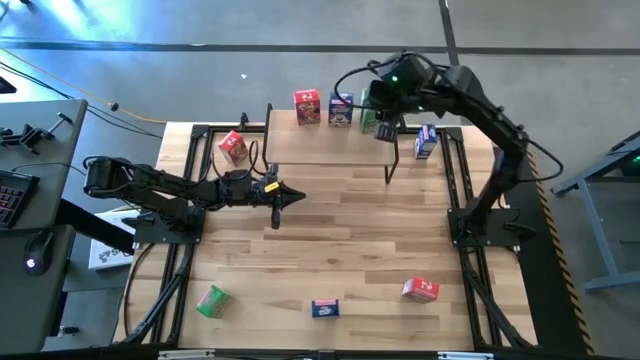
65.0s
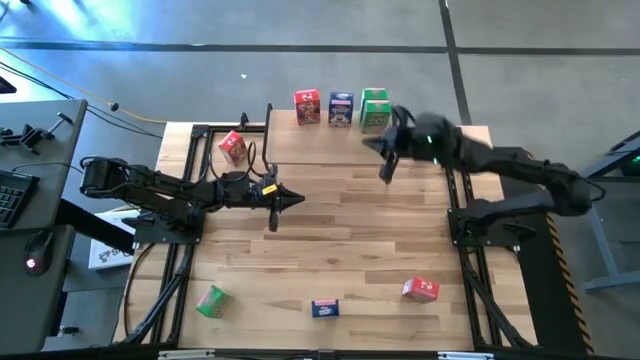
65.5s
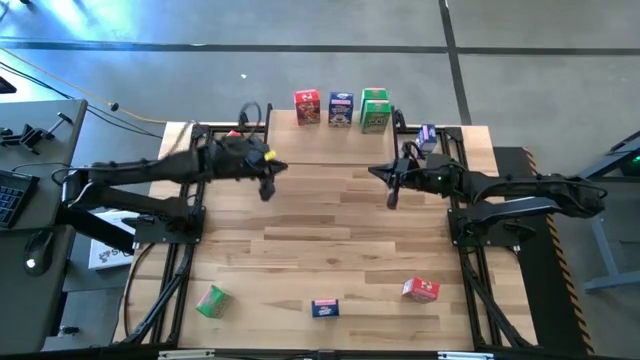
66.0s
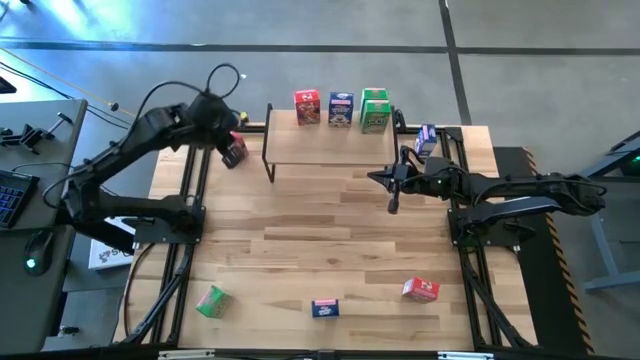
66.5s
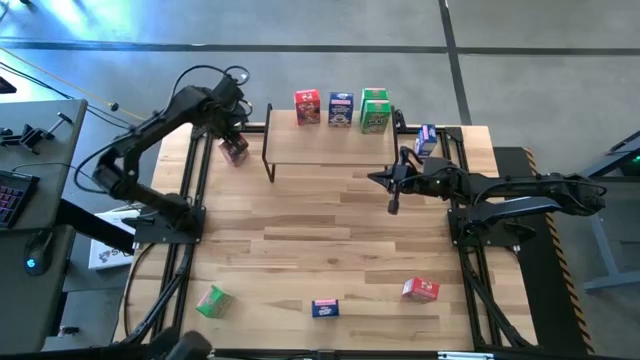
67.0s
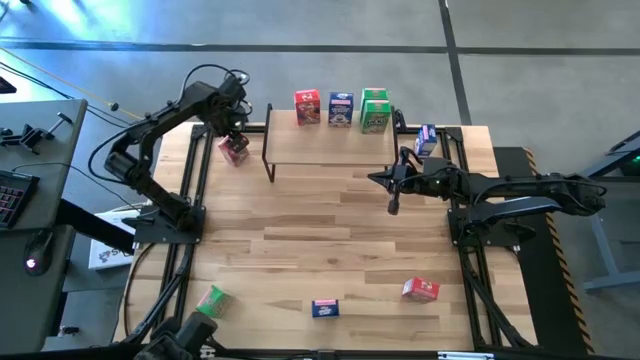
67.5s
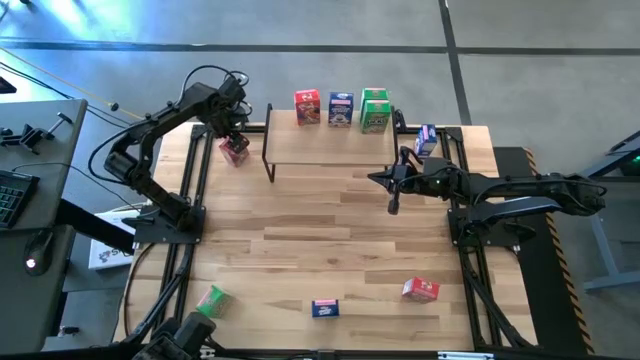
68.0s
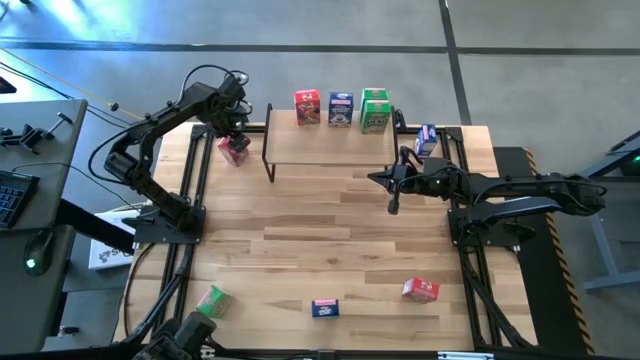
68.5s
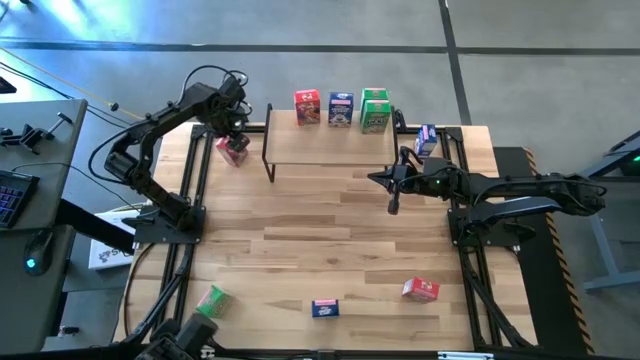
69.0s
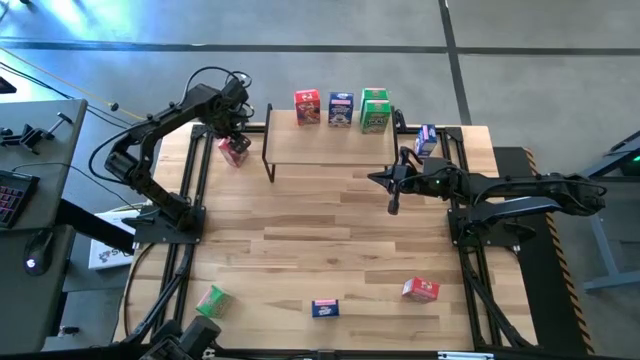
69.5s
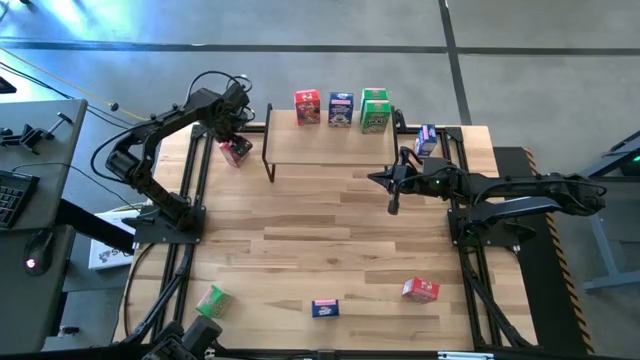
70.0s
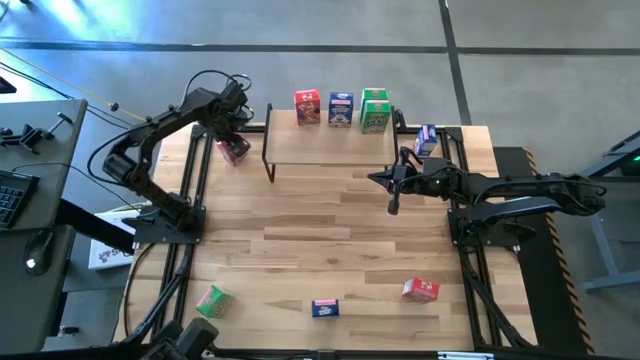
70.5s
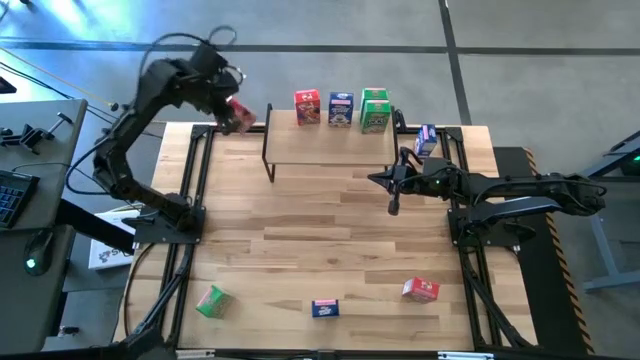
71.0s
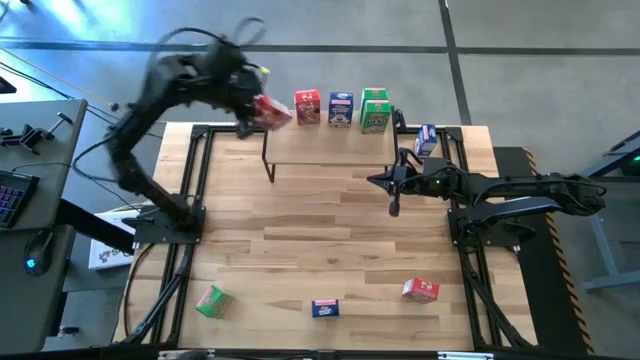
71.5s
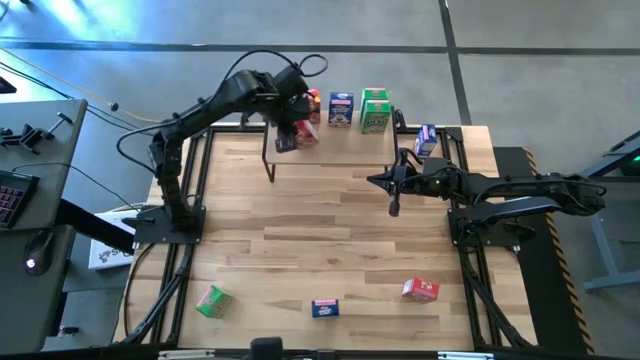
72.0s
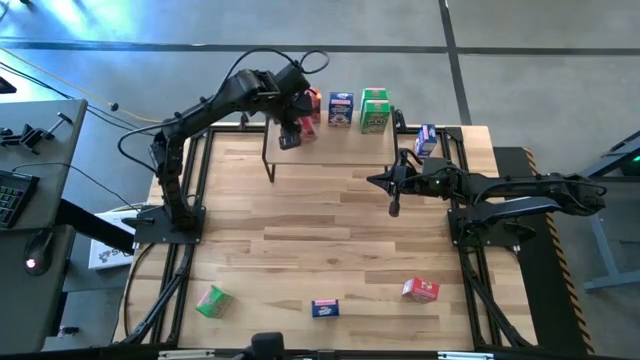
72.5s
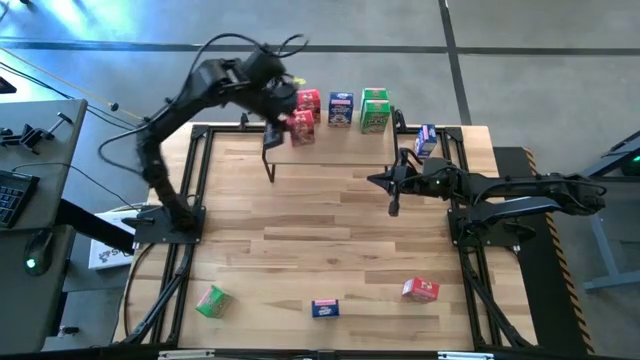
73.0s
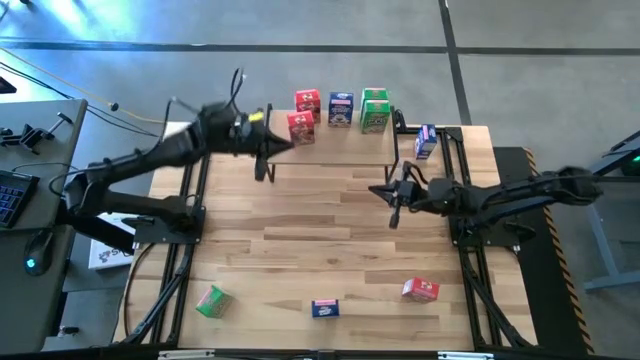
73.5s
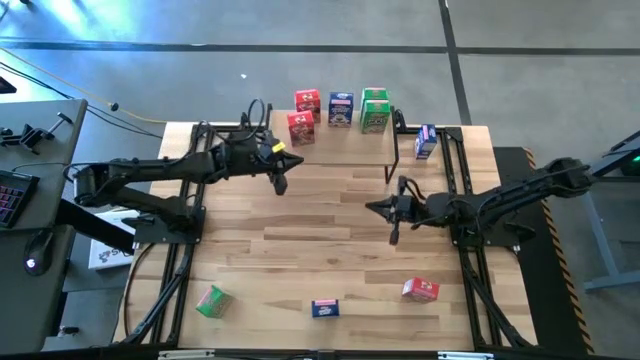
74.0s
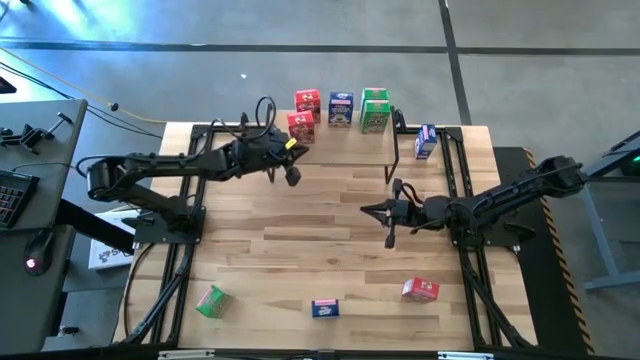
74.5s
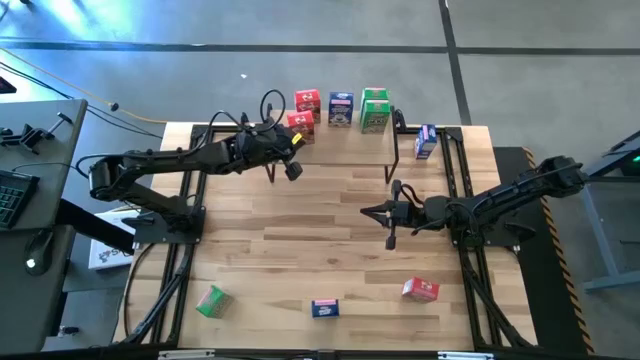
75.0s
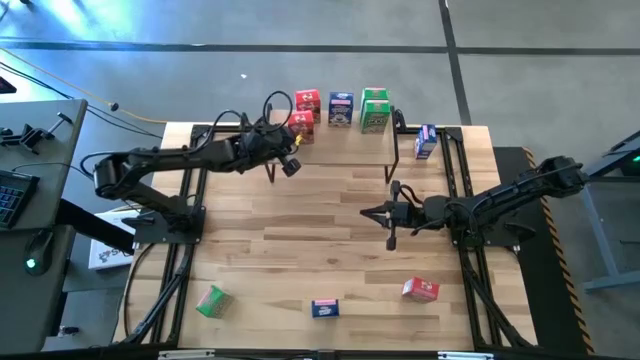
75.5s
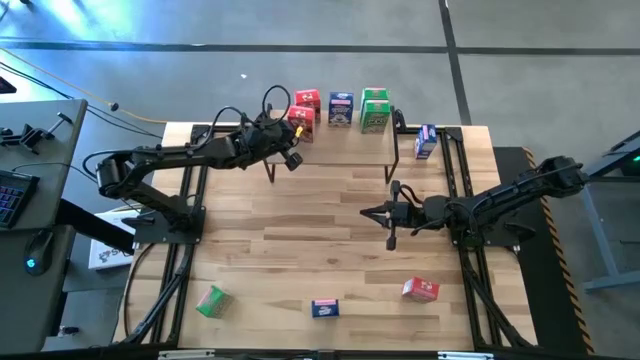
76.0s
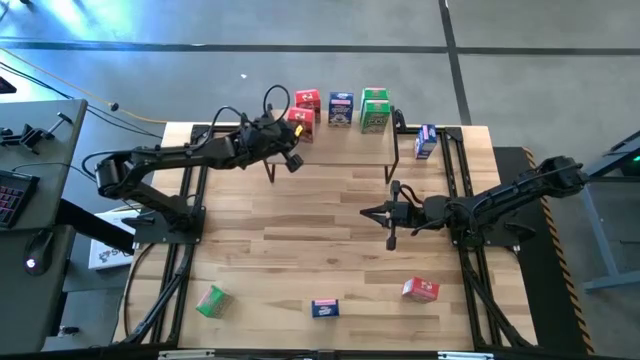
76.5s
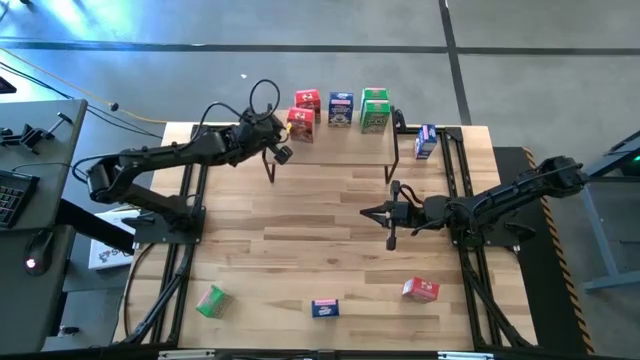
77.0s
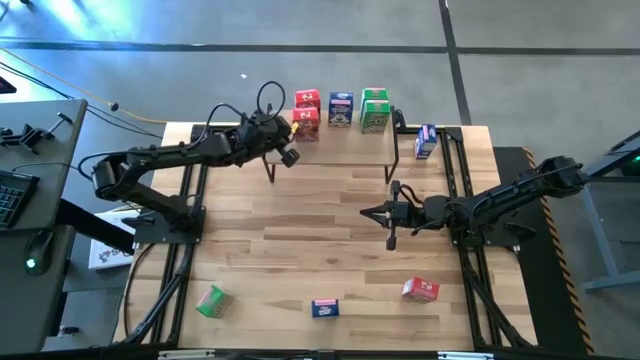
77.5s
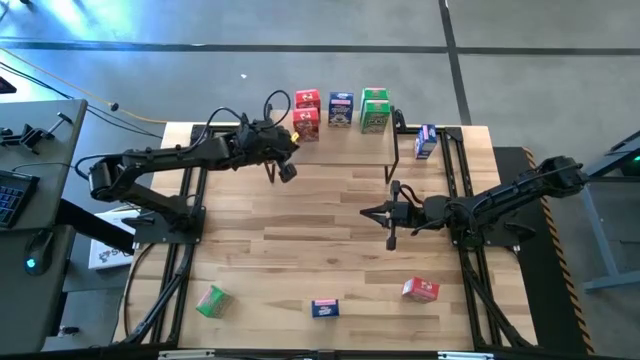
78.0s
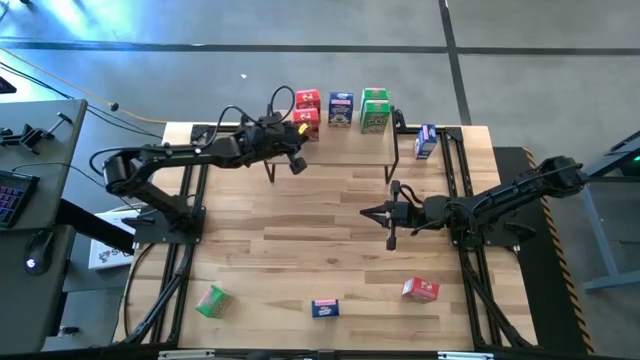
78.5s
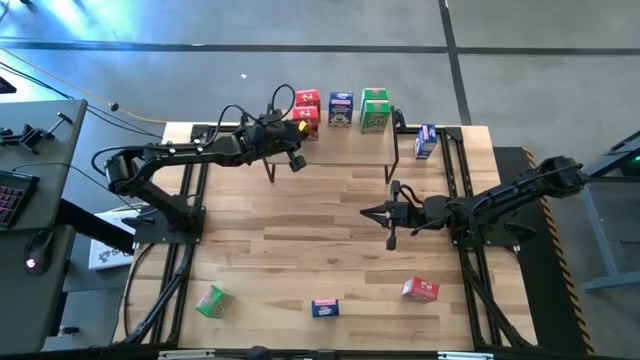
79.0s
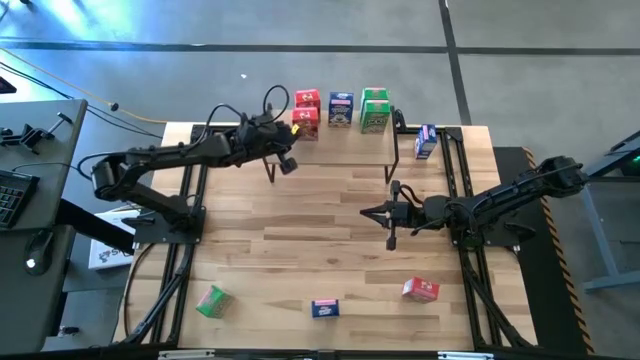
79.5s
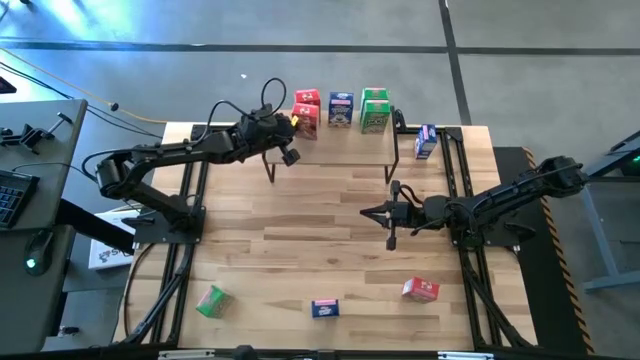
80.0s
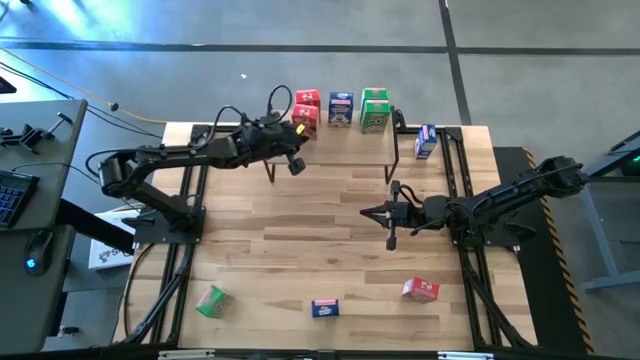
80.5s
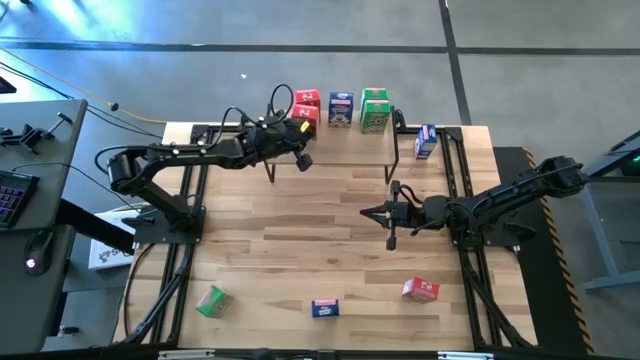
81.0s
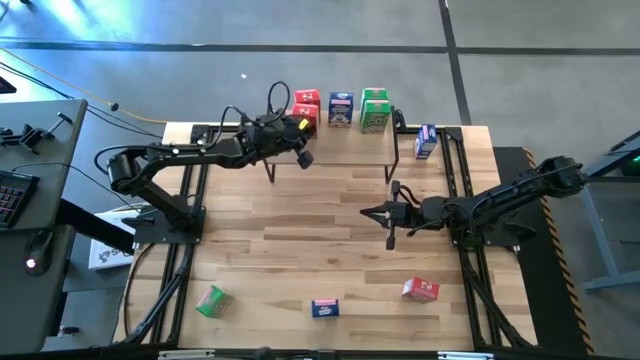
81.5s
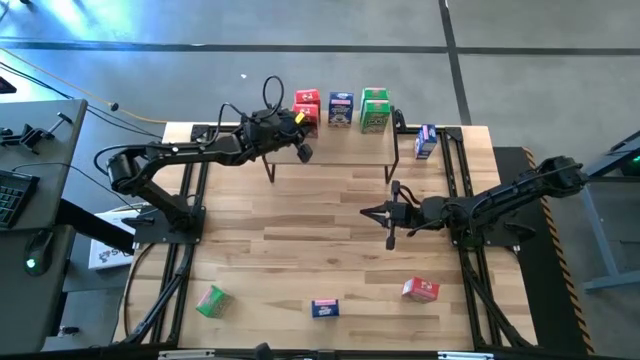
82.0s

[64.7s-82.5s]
Task: Stack cereal on shelf
Put the top red cereal box in front of the other red cereal box on the shelf

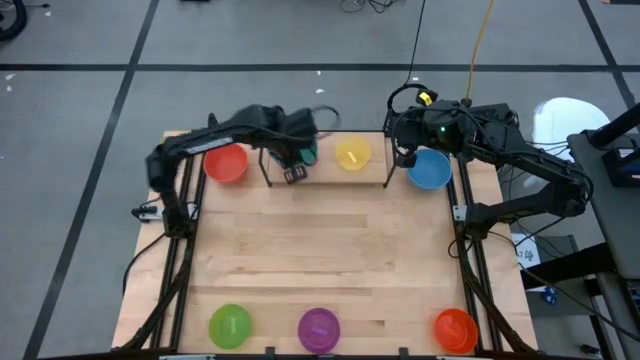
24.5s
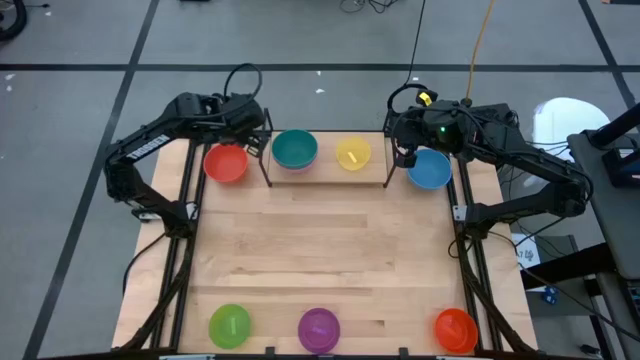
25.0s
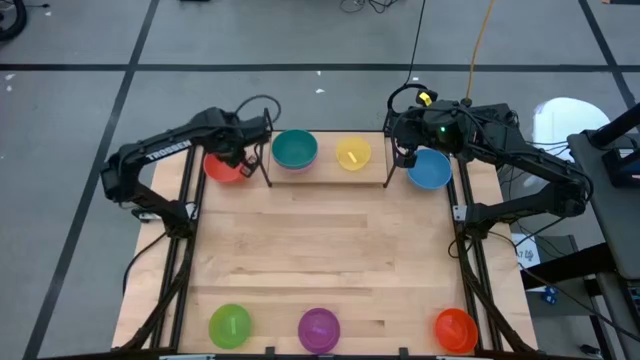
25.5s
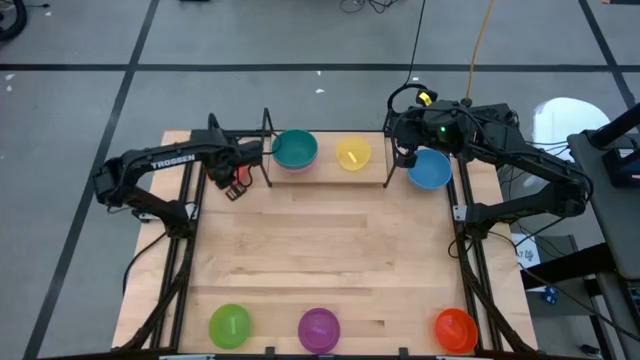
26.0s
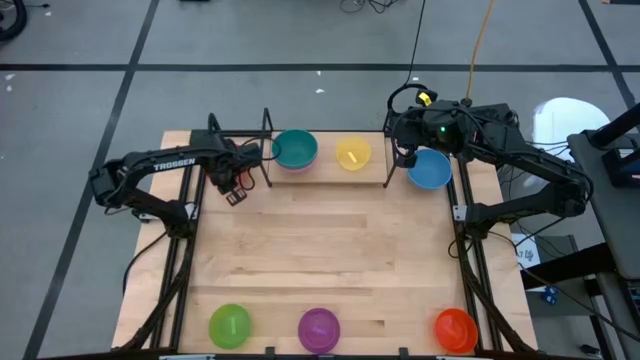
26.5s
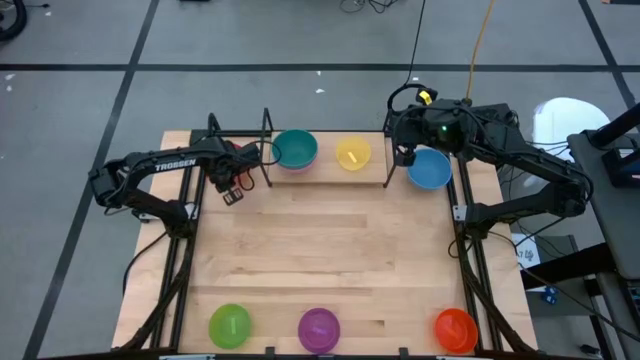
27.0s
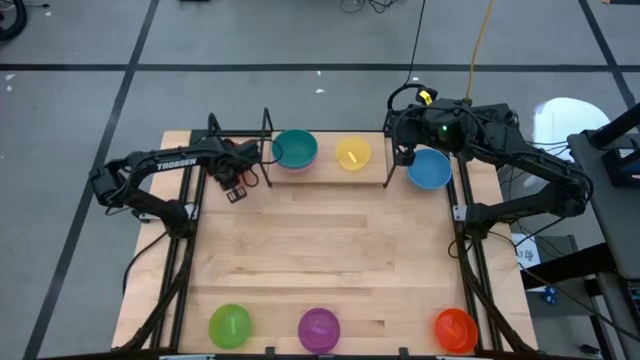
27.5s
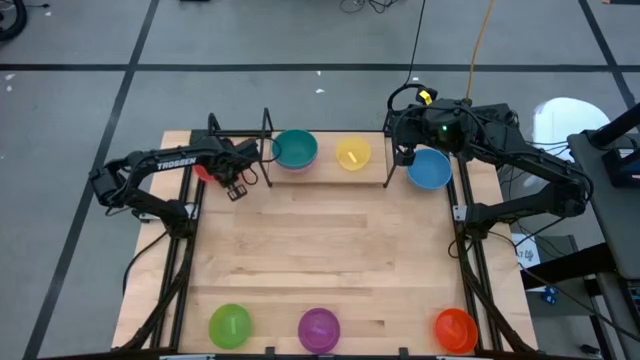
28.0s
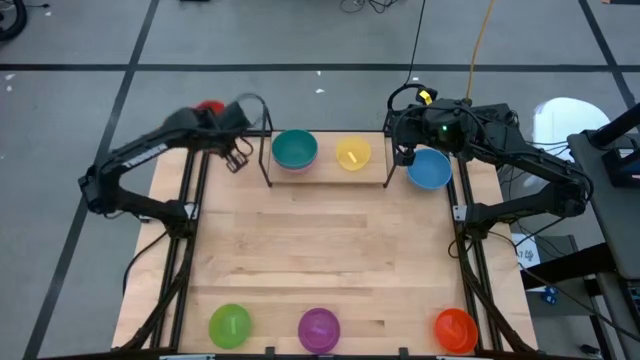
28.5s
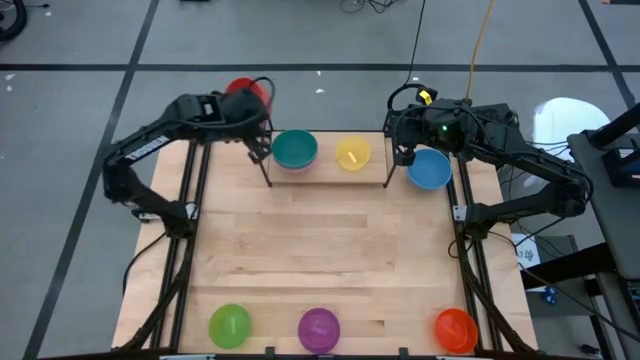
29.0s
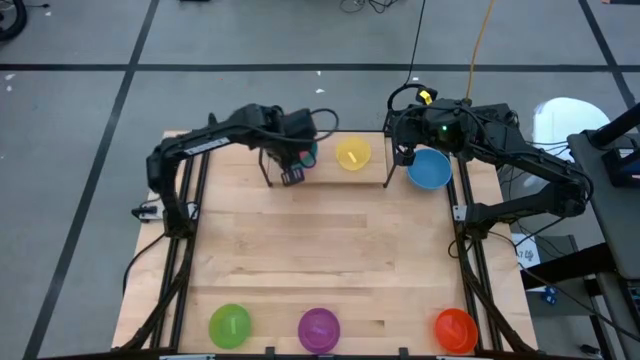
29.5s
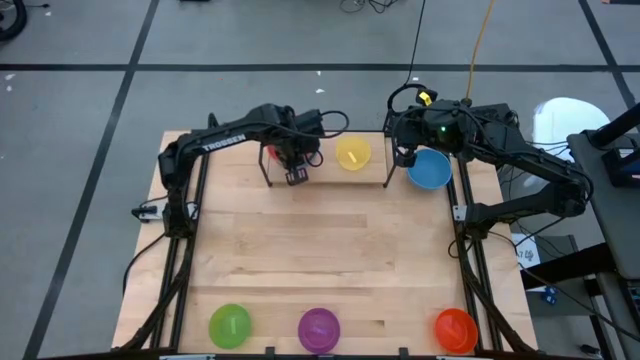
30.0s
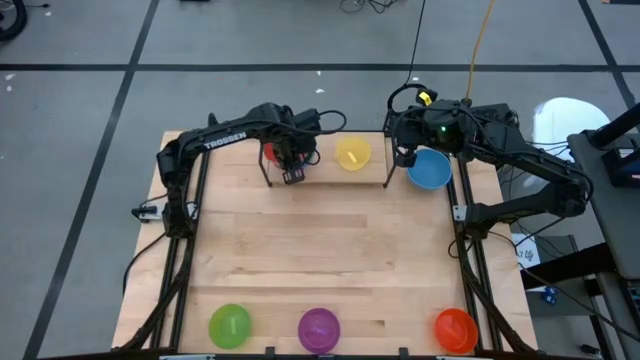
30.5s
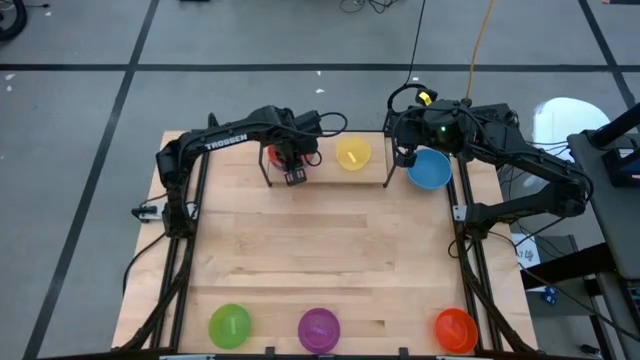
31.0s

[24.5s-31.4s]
Task: Place and stack bowls onto a shelf
Stack the orange bowl on top of the green bowl on the shelf
